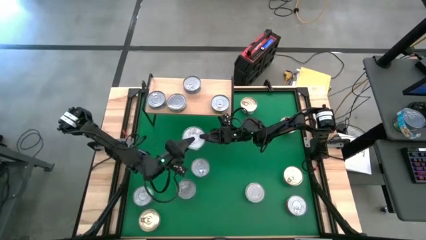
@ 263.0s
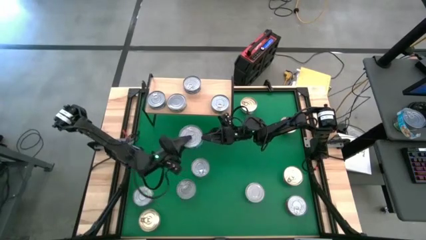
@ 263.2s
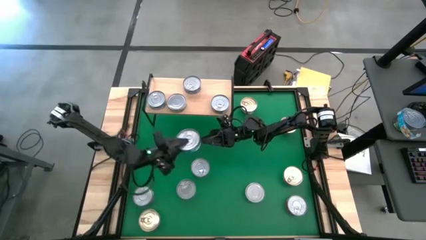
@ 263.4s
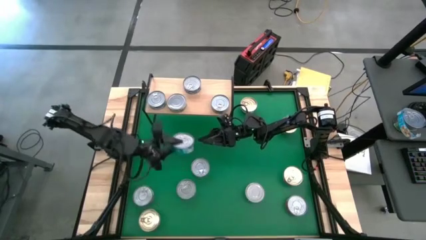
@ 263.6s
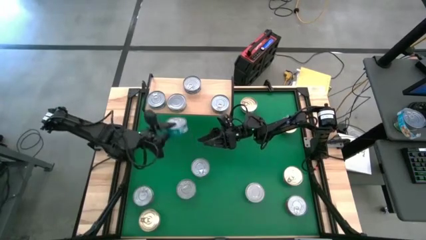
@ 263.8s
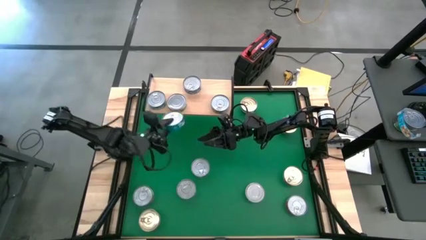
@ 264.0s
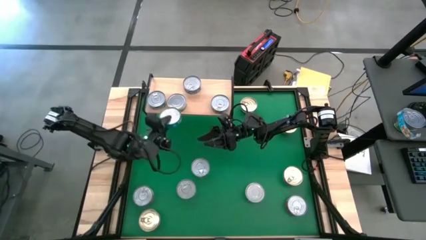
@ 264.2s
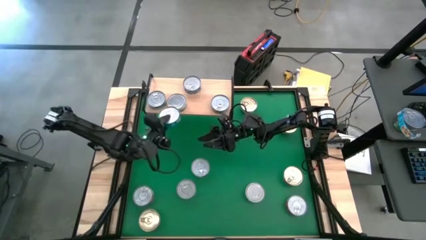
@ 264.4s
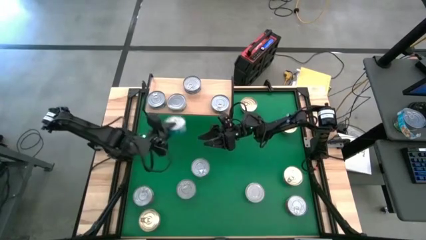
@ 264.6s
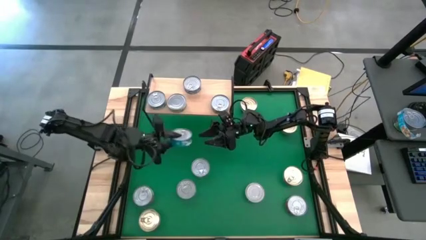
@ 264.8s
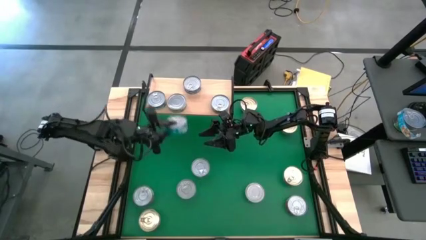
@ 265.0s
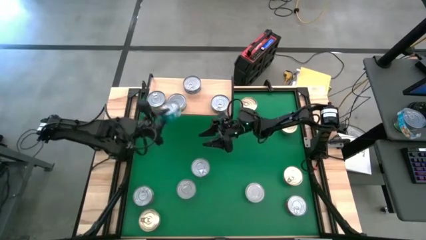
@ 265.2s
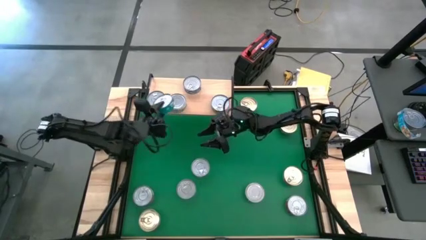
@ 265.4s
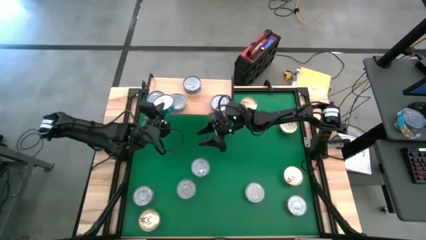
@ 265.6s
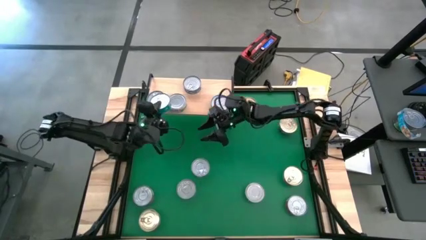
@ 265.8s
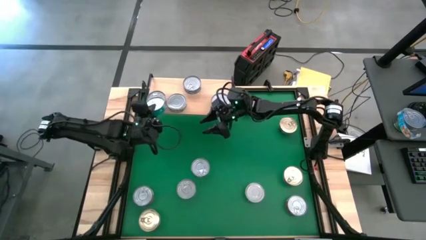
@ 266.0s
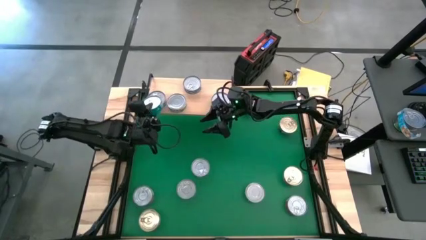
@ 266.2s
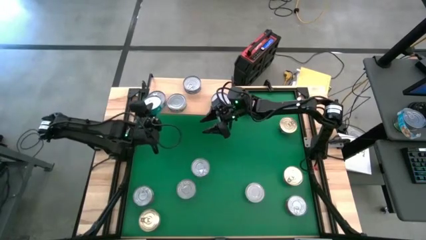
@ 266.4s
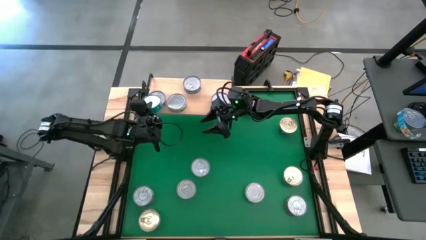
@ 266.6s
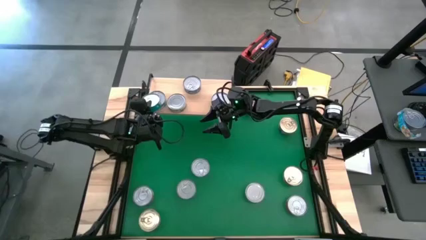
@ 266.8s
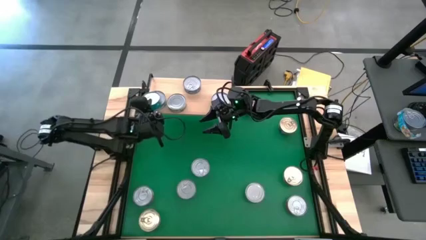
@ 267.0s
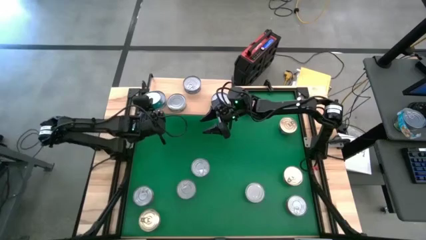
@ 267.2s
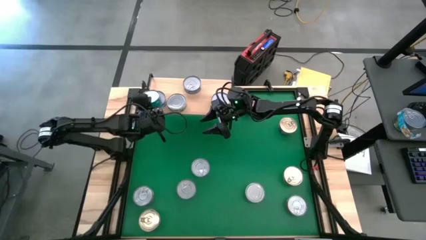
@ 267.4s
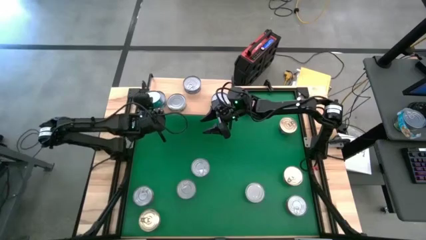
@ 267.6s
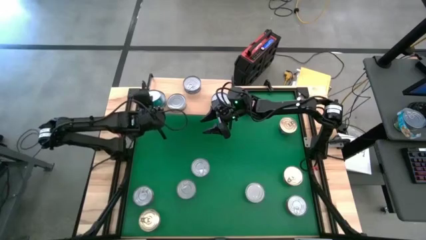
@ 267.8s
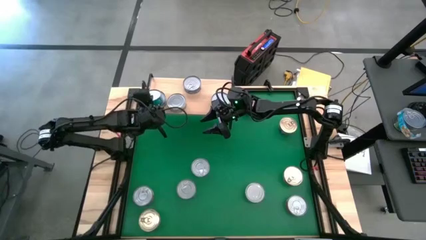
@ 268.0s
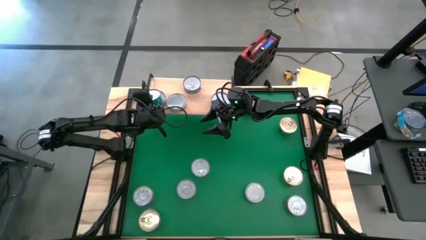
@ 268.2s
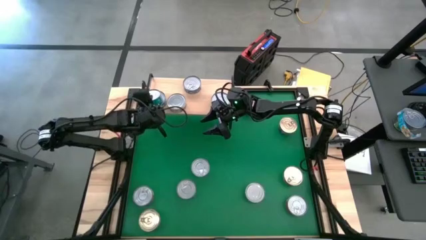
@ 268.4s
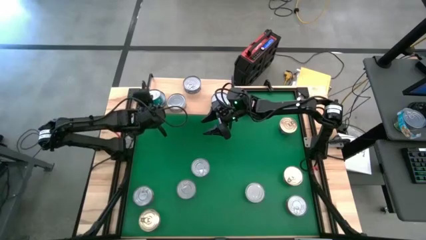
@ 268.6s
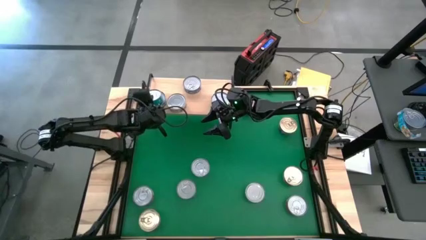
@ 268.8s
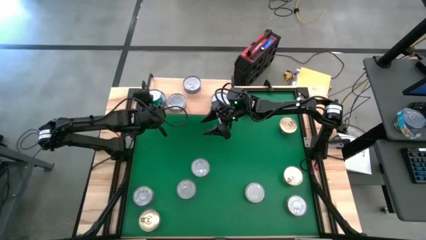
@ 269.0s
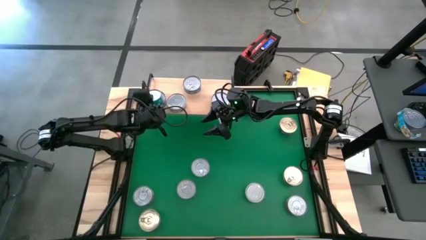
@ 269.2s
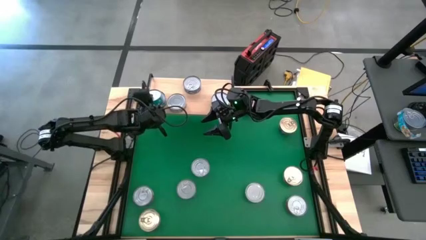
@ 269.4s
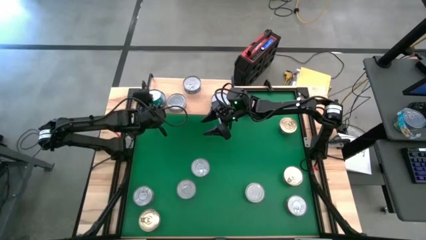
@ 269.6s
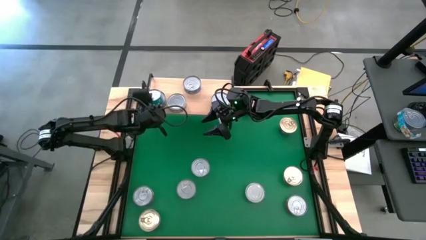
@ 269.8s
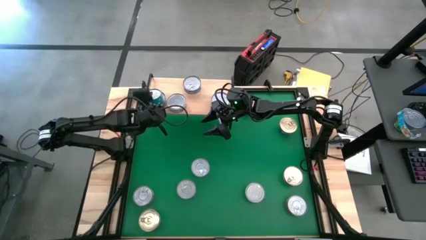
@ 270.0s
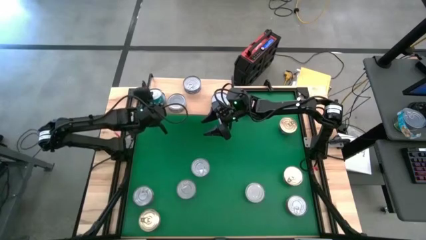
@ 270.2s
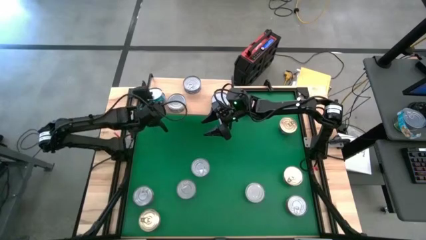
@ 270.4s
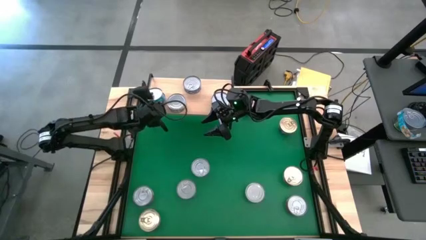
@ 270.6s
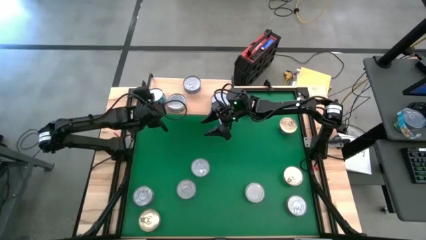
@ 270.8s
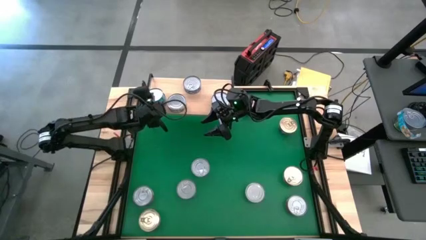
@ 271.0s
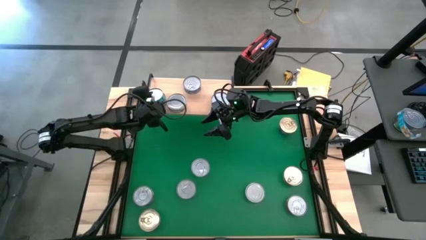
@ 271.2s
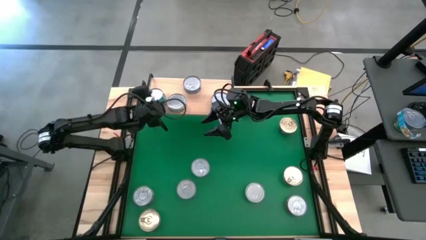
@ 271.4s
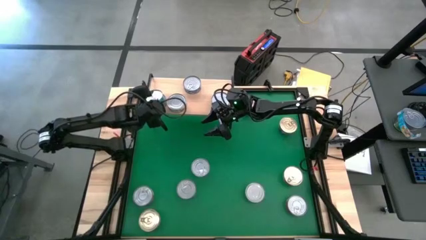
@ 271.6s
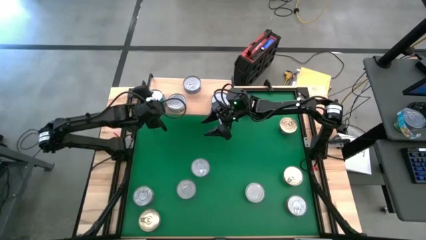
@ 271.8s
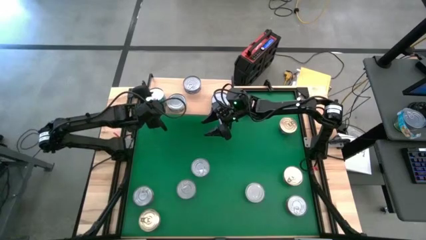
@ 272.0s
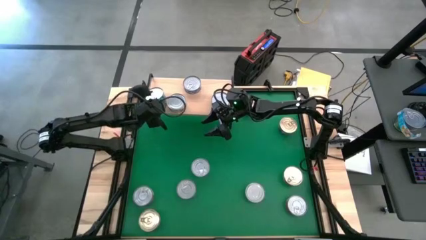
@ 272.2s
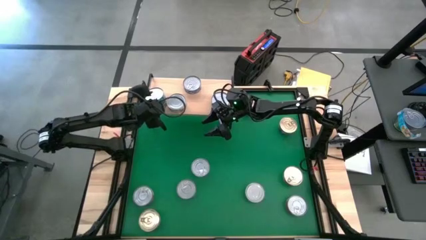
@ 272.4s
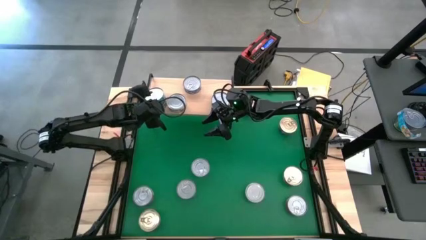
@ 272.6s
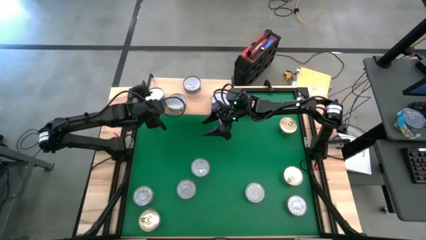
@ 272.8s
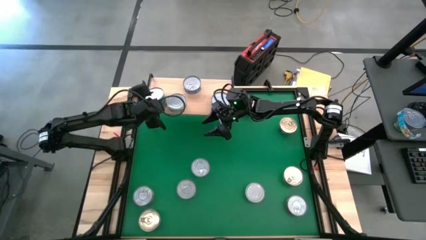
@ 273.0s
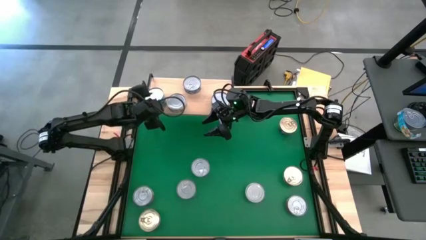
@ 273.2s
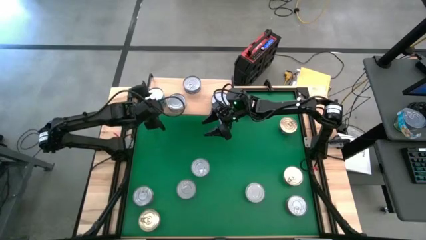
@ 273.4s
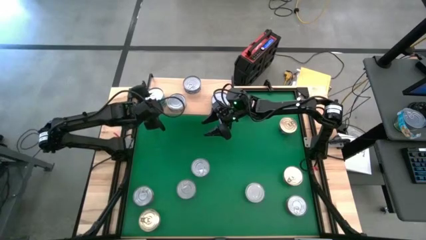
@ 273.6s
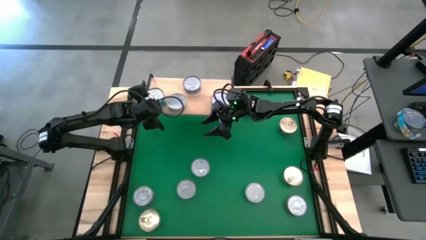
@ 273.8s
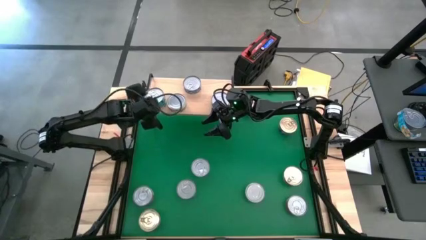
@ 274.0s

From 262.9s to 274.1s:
Task: Stack canned seafood by type on shelf
Stack the center light blue tuna can on top of the light blue tuna can on the shelf
